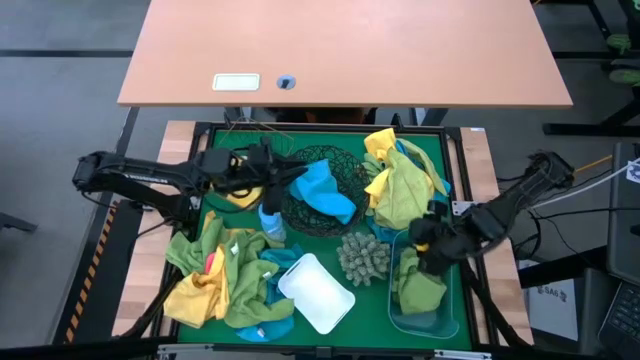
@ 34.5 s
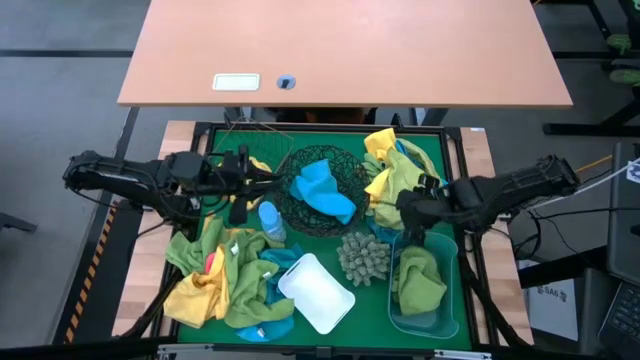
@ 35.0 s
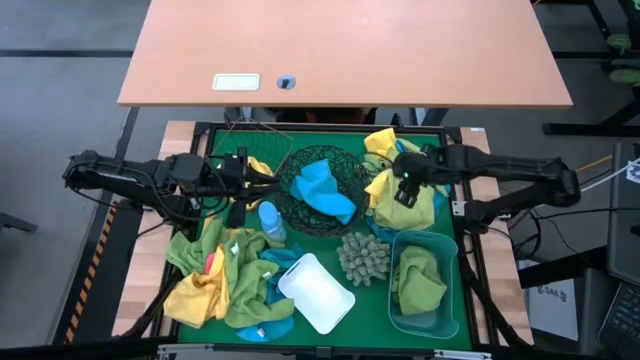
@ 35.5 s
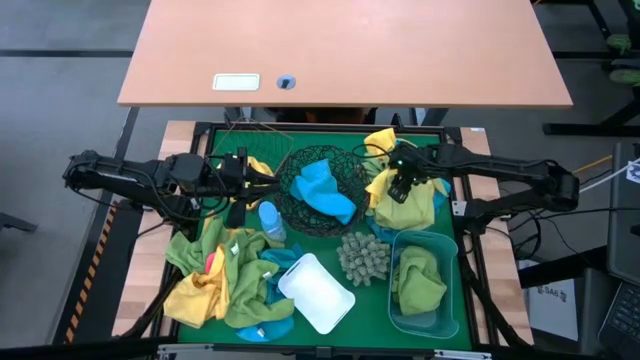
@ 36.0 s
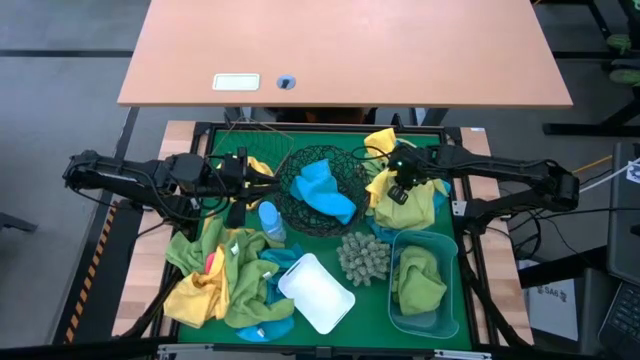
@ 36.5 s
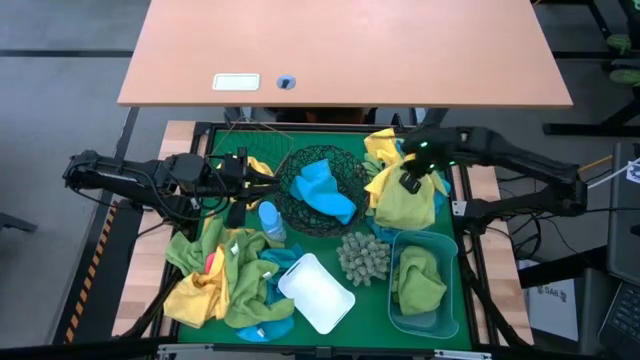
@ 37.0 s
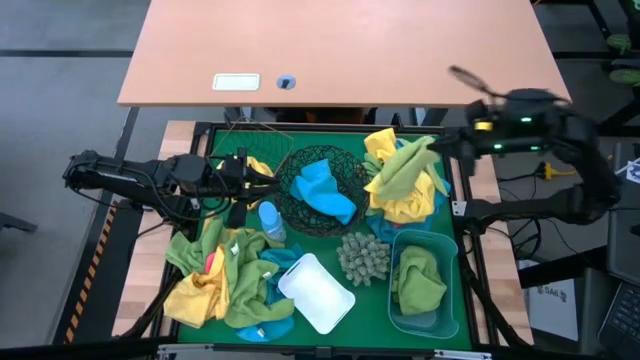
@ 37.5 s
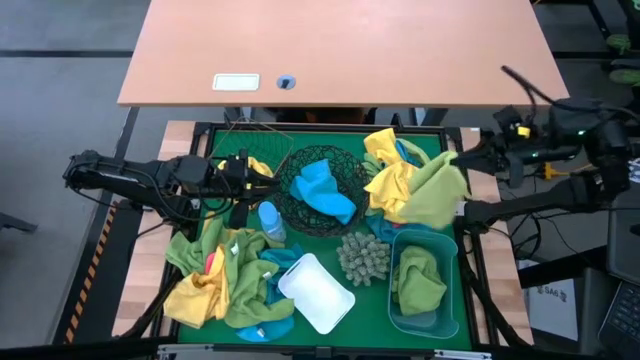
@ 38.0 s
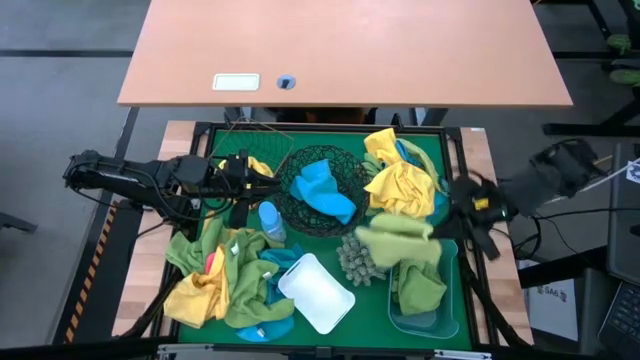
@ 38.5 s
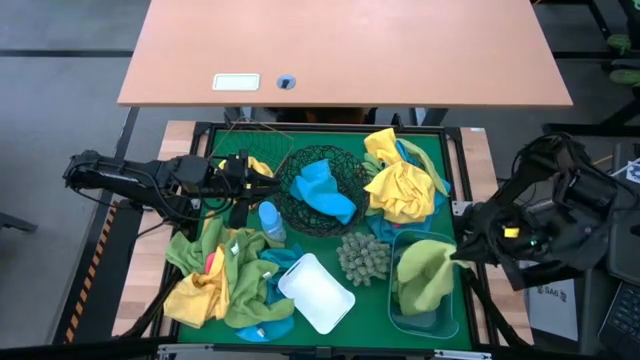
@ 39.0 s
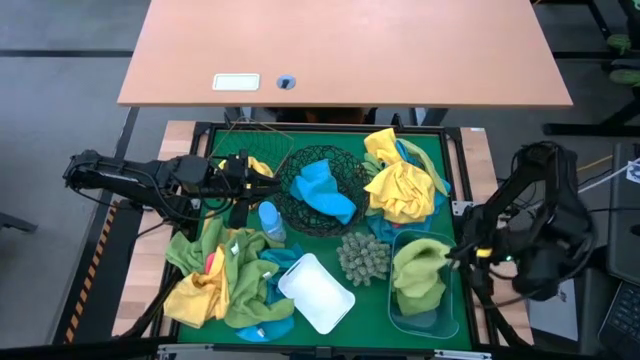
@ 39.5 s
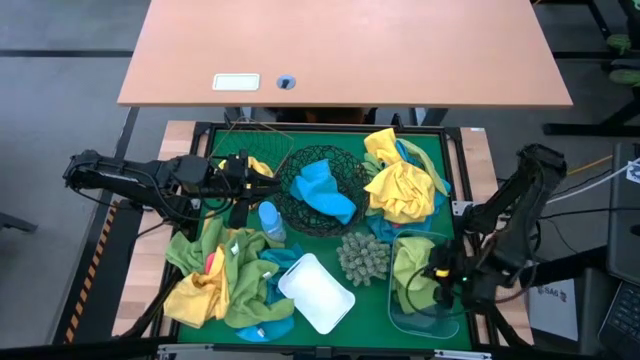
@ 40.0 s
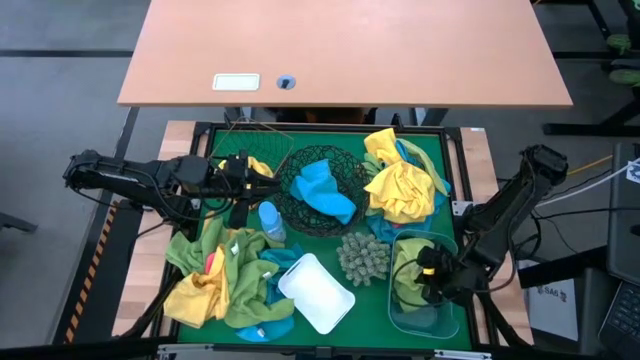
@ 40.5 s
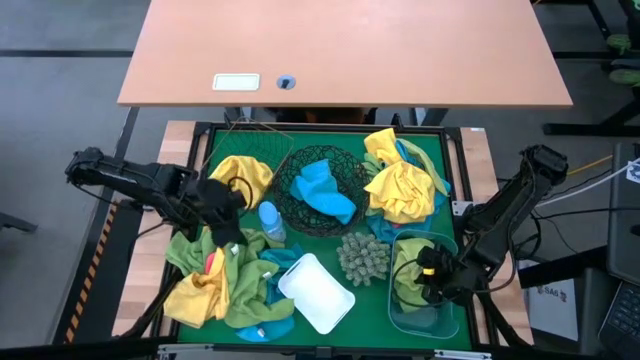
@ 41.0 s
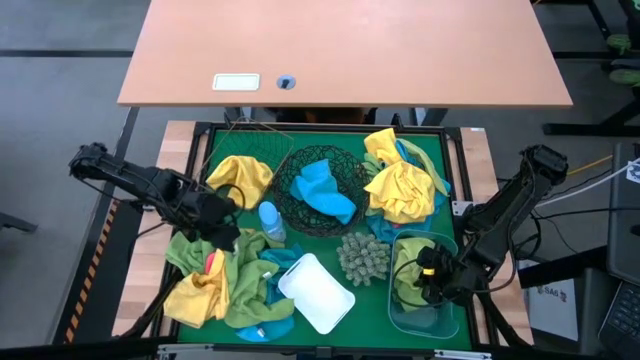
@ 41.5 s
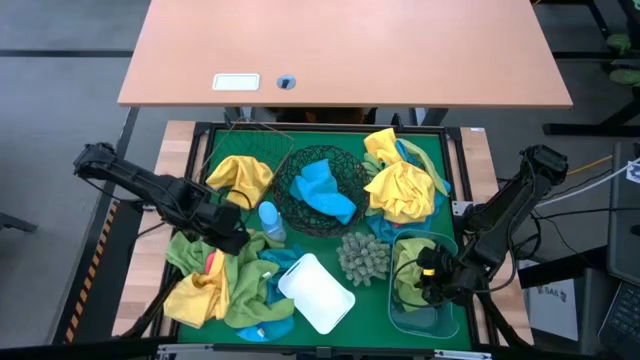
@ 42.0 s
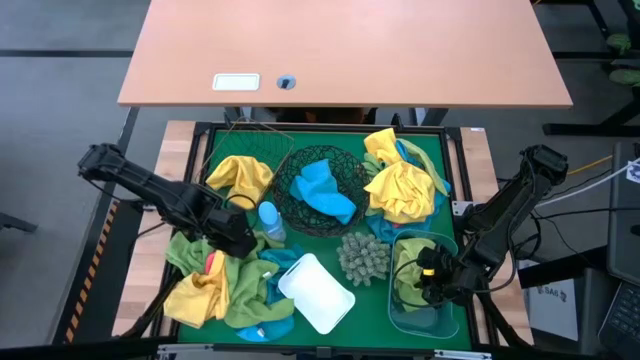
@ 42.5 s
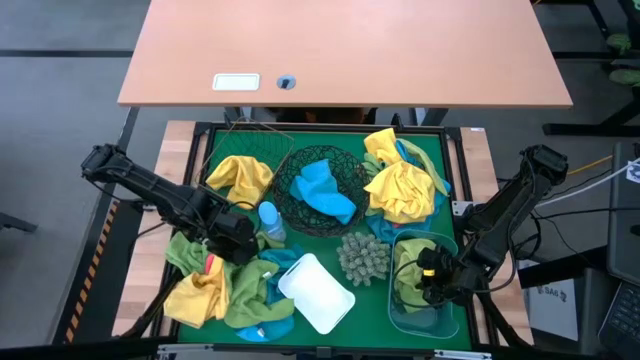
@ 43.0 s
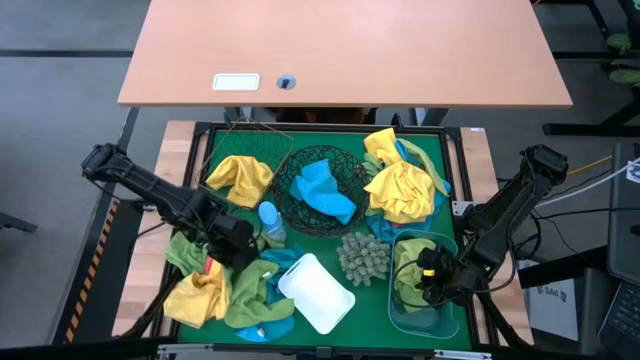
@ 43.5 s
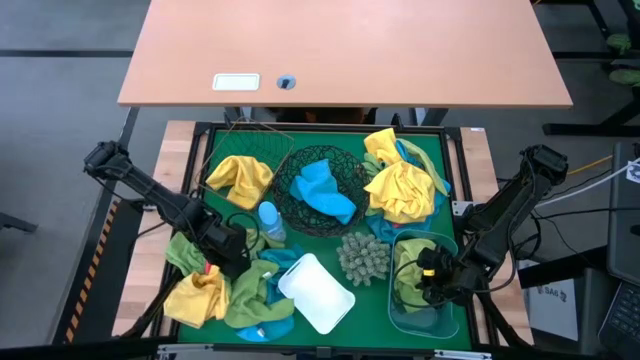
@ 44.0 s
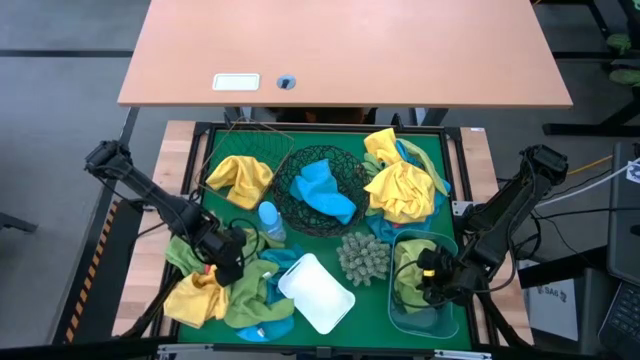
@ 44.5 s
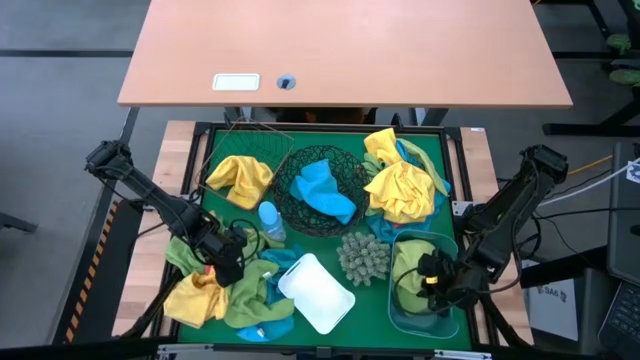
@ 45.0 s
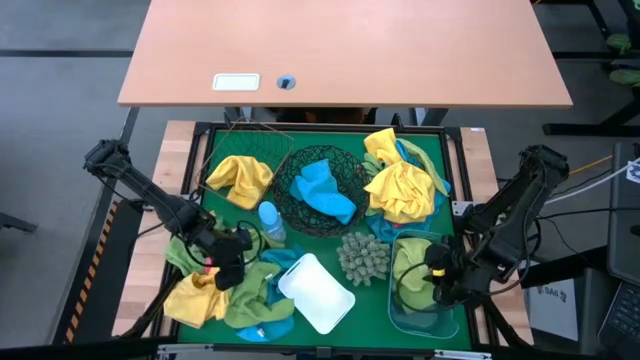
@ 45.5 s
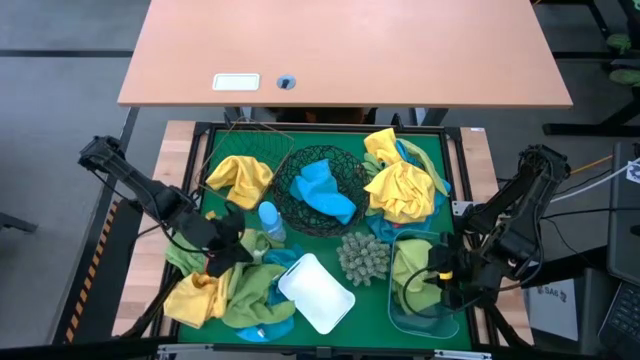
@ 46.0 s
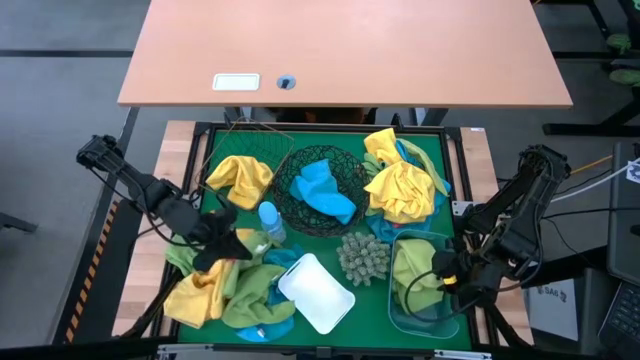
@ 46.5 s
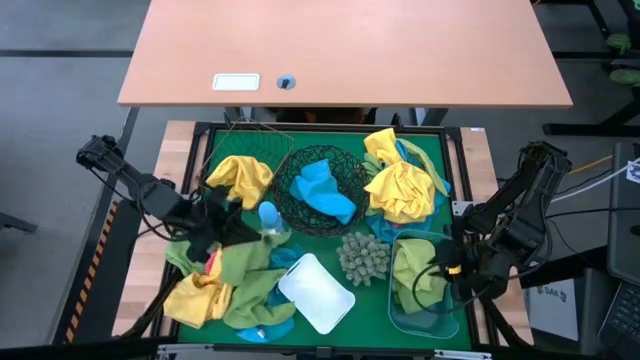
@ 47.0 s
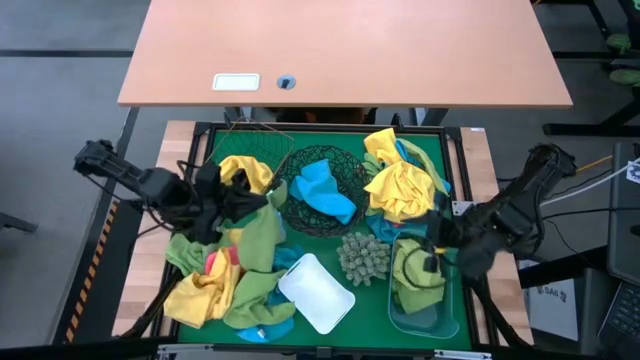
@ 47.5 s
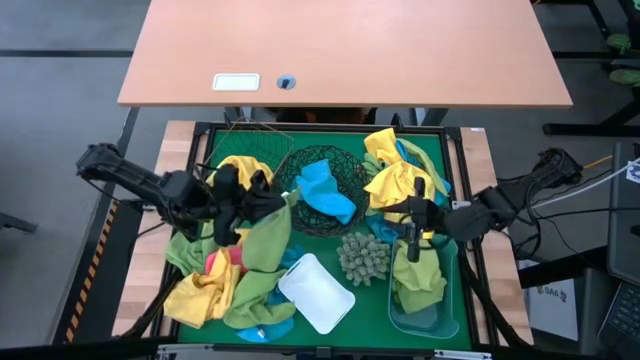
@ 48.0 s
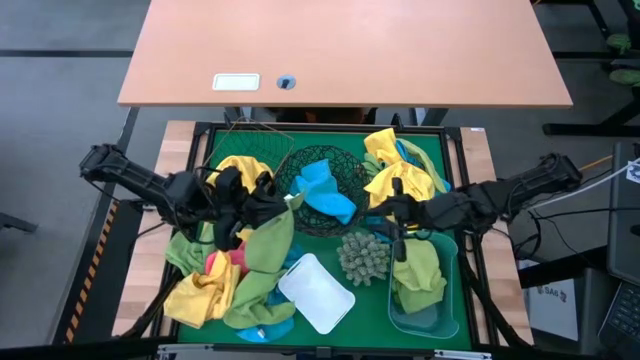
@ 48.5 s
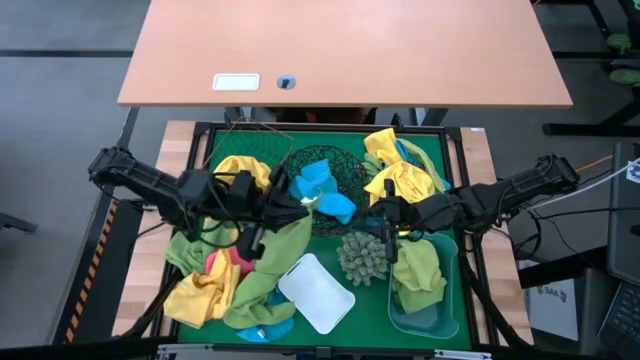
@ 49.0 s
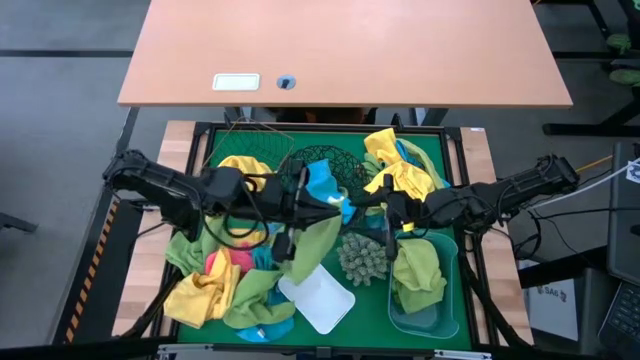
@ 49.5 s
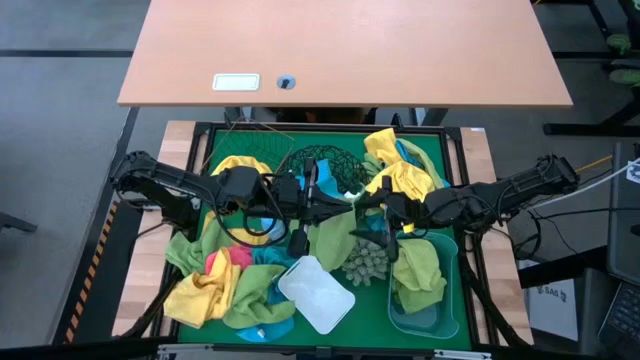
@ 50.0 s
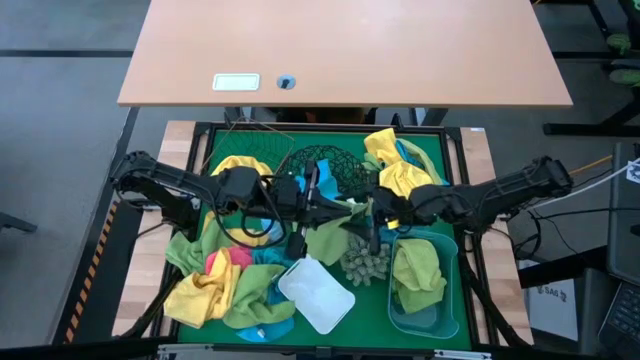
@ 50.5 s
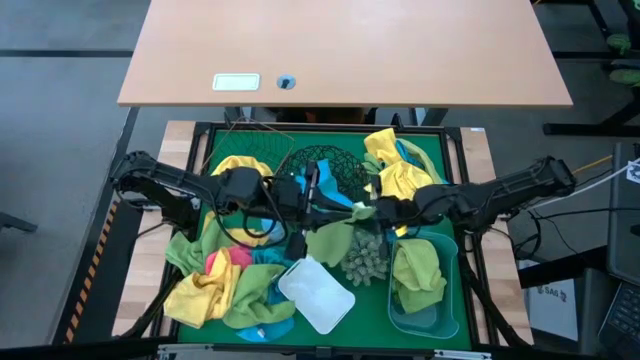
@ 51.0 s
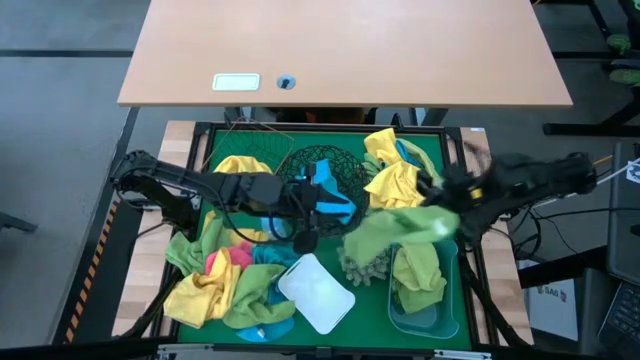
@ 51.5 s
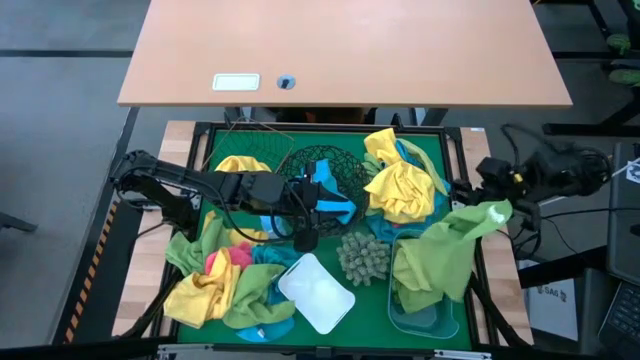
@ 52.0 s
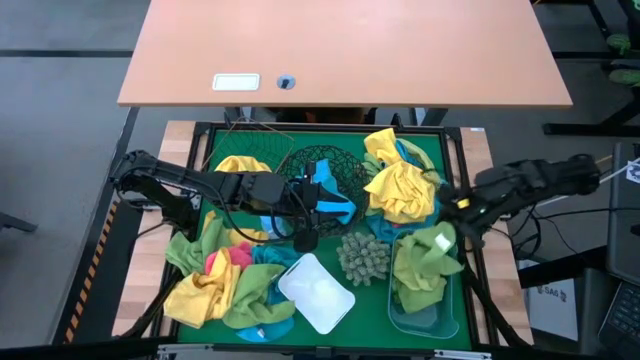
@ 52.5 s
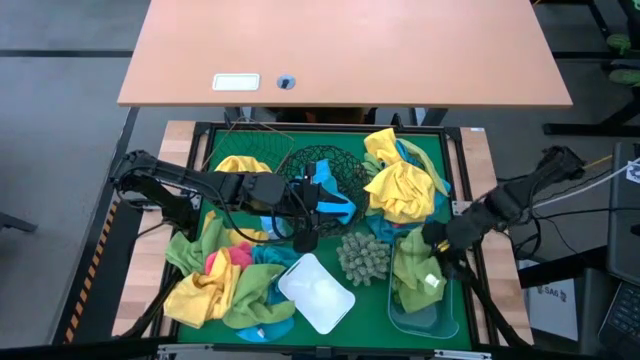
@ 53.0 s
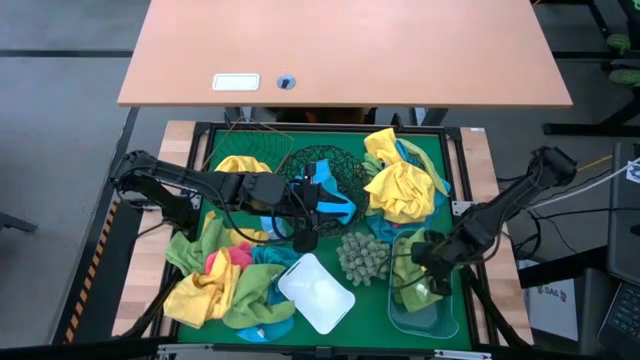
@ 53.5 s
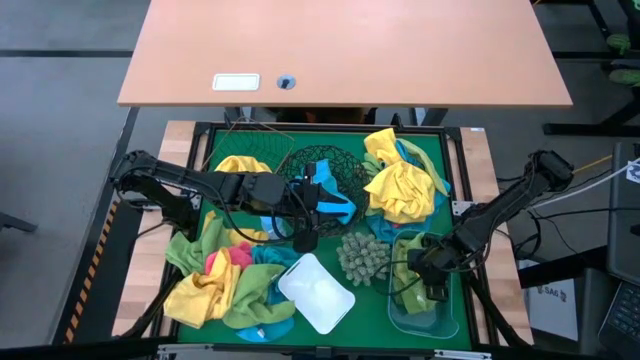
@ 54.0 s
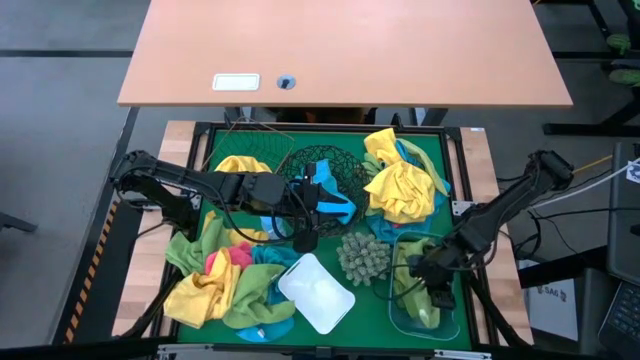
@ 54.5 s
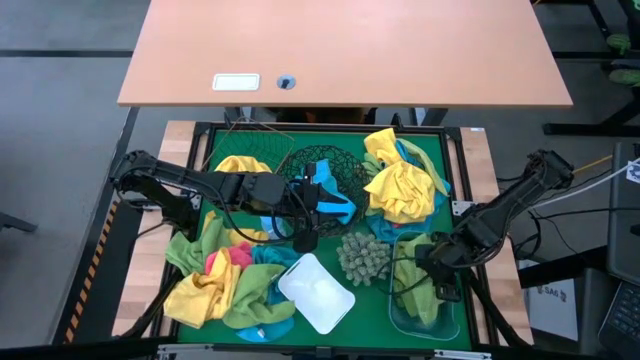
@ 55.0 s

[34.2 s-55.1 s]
Task: Sort microfiber towel by color & place in baskets
Put the green microfiber cloth into the blue bin
